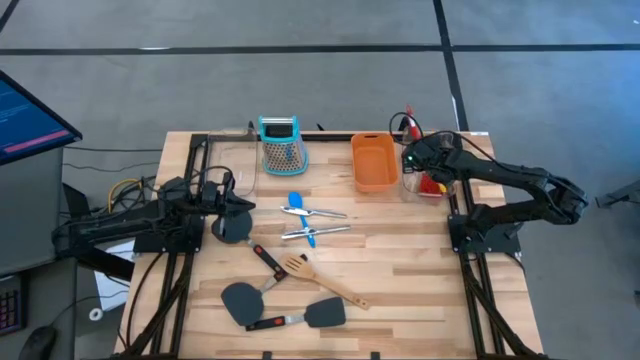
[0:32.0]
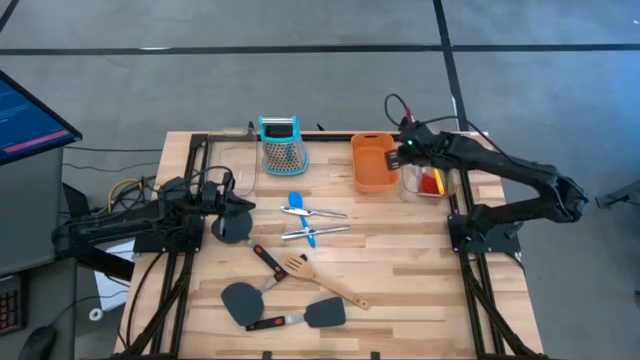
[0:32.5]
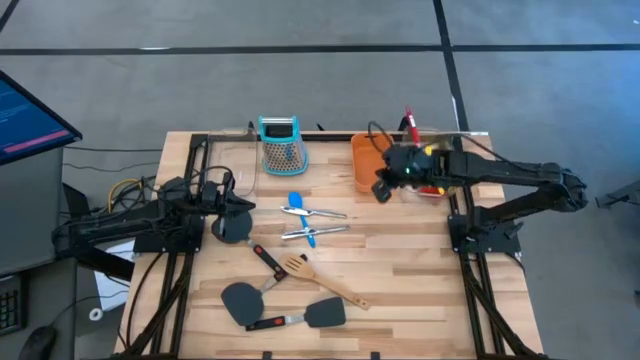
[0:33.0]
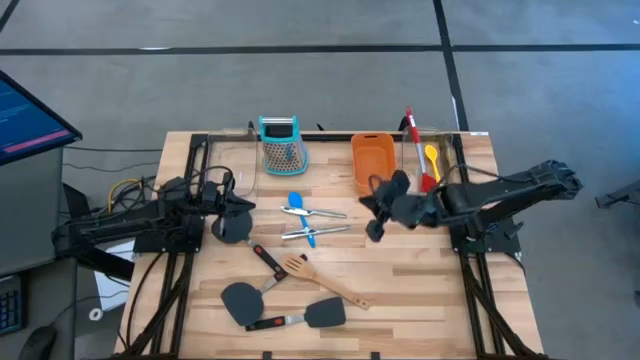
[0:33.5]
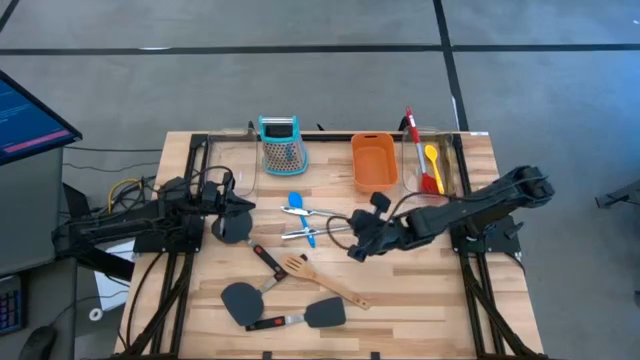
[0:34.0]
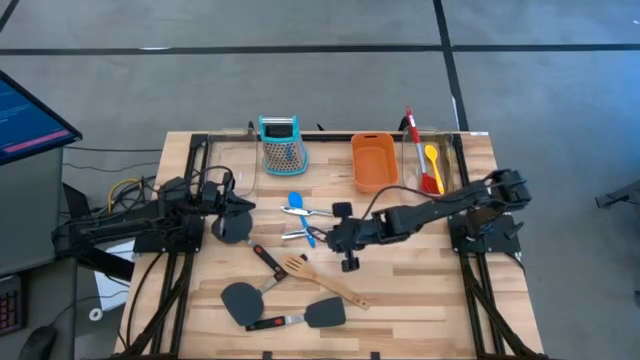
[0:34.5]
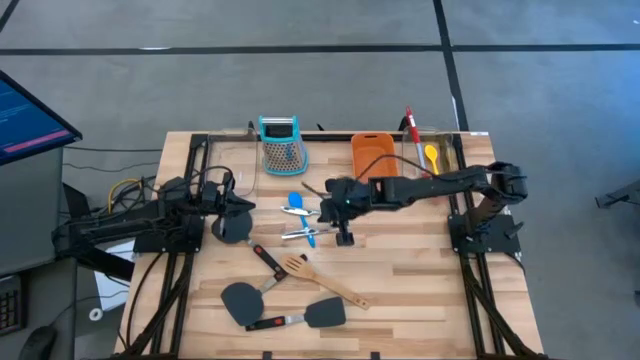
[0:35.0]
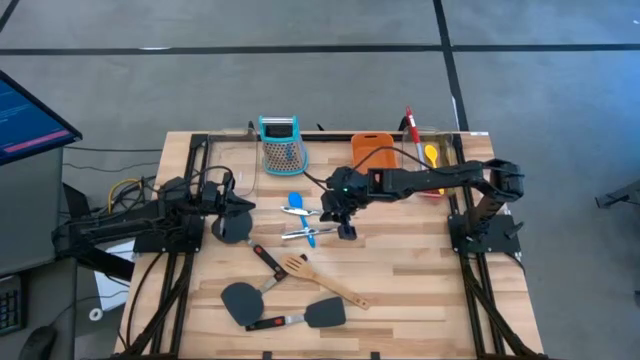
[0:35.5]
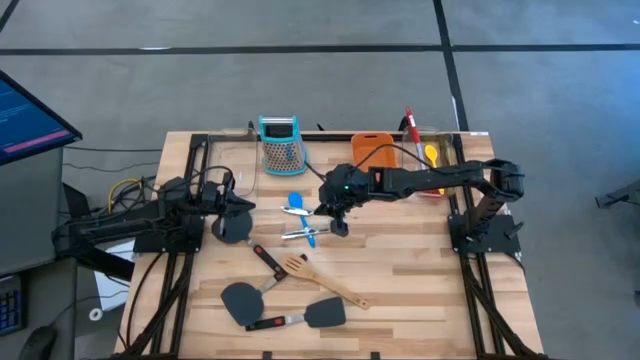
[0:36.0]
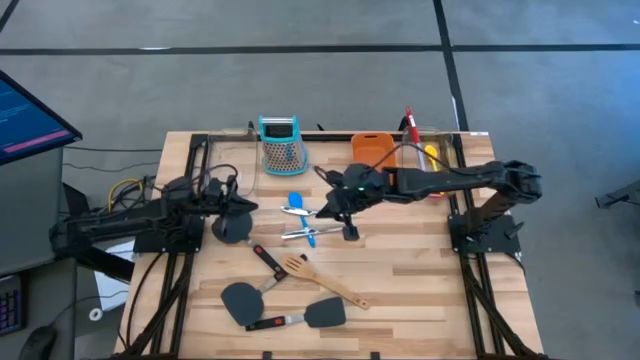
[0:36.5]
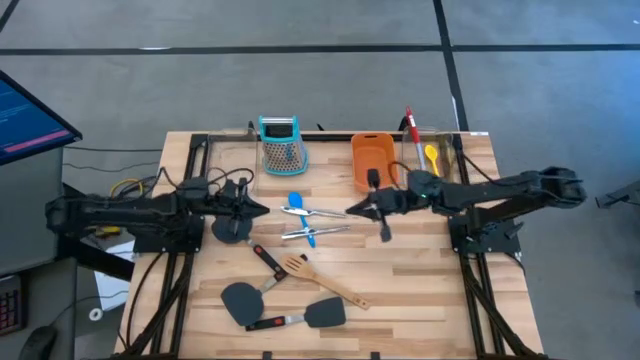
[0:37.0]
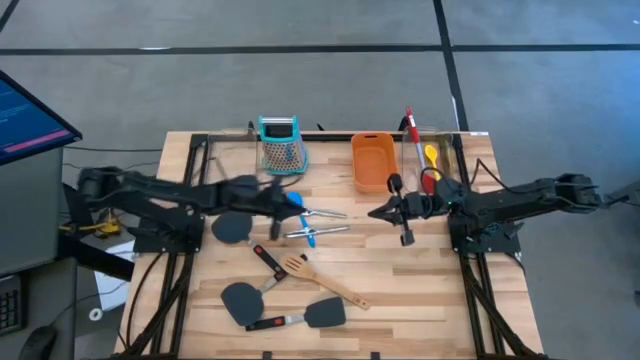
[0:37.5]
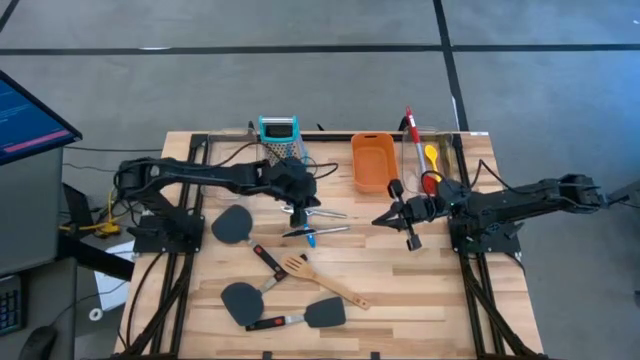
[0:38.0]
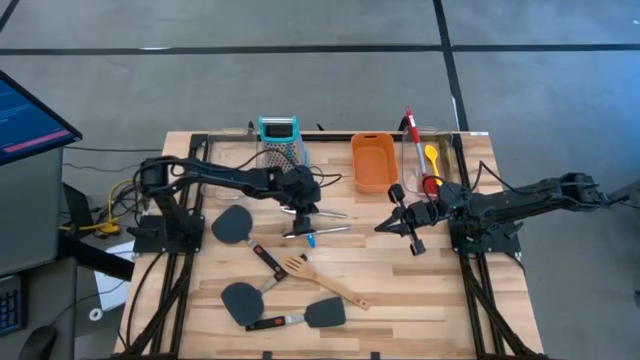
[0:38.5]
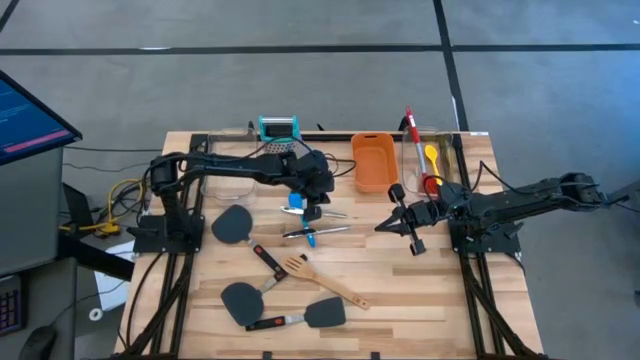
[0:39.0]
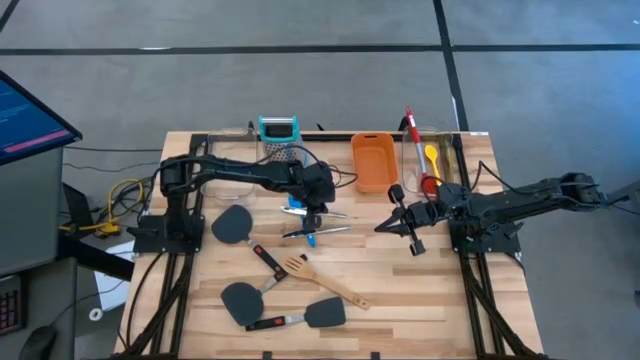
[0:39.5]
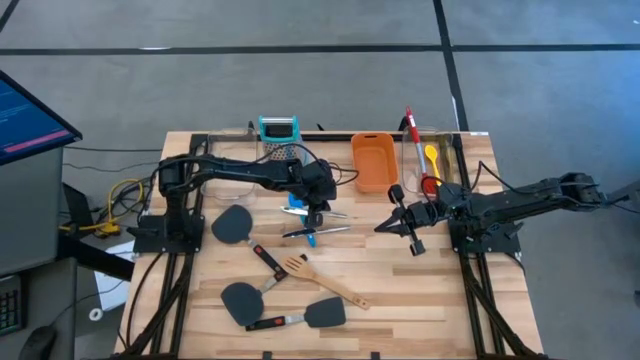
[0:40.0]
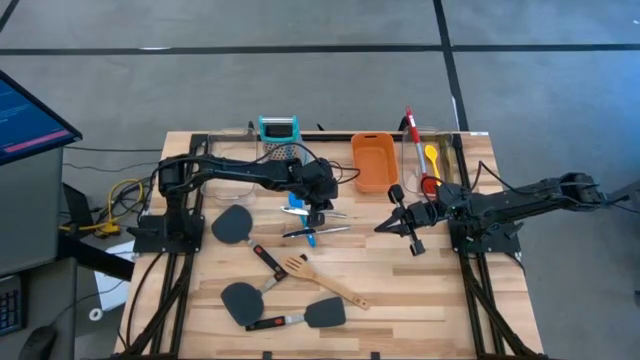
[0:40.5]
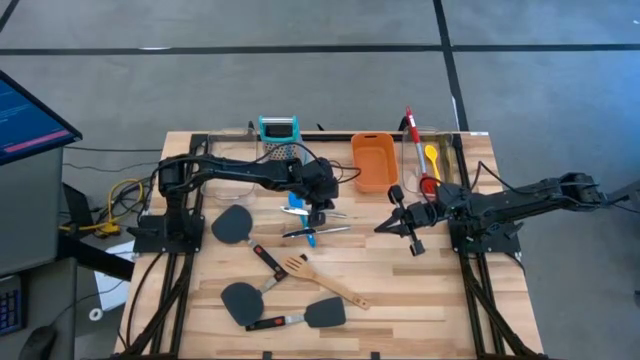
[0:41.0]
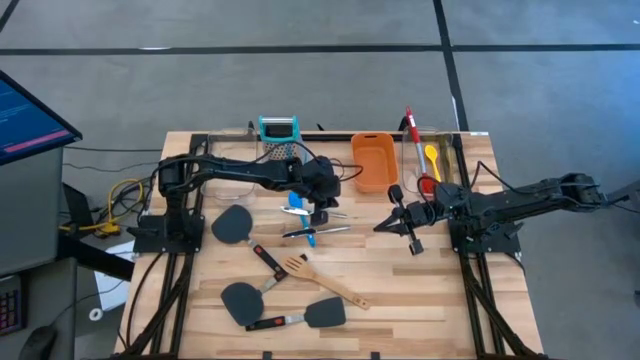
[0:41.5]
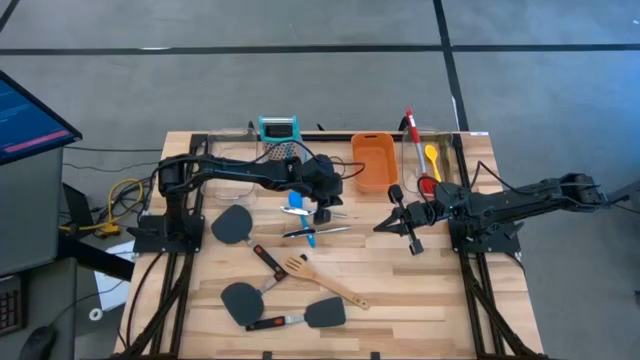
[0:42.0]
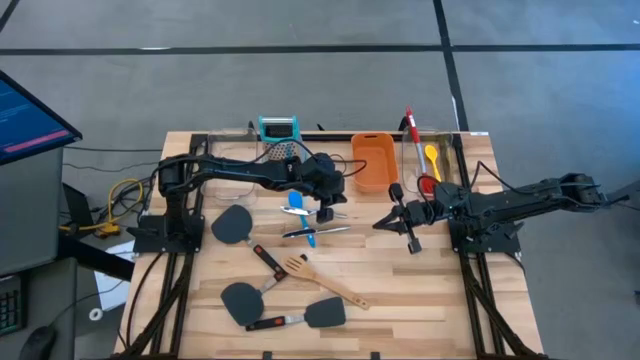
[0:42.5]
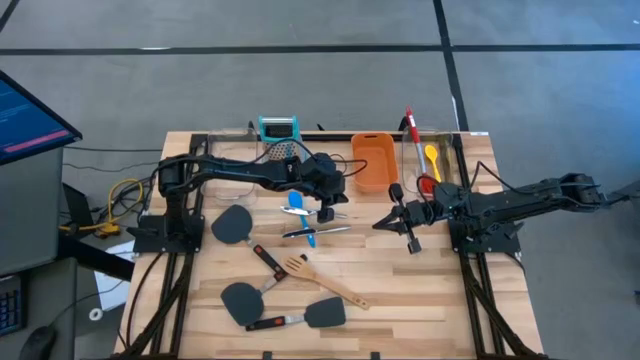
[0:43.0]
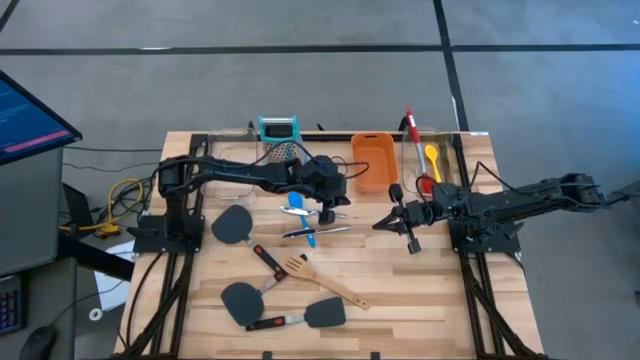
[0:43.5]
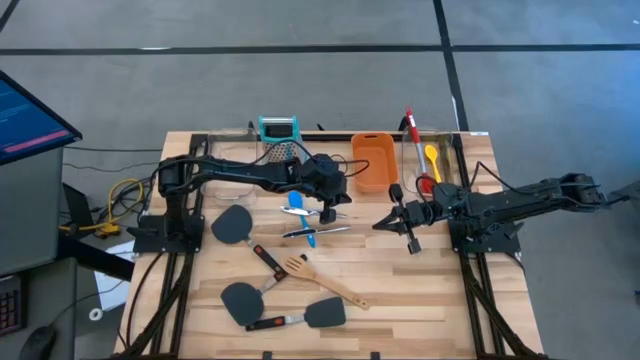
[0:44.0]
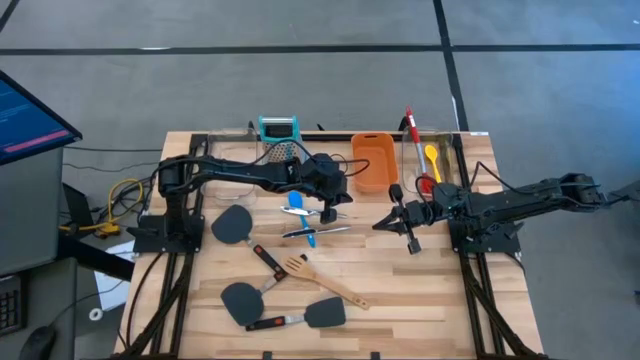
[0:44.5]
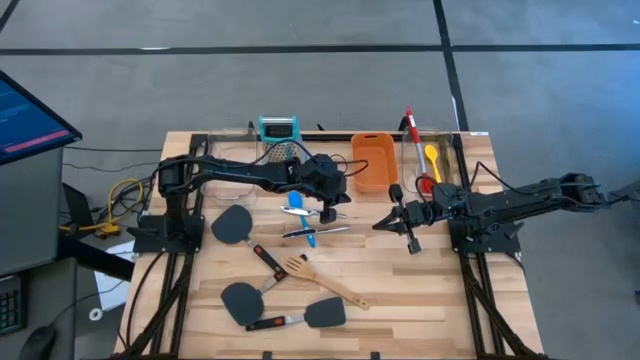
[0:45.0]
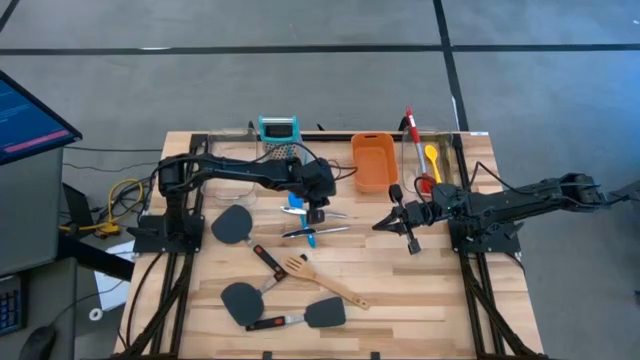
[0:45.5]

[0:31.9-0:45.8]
Task: Pick & Place Kitchen Items
Put the top silver kitchen knife into the orange bin

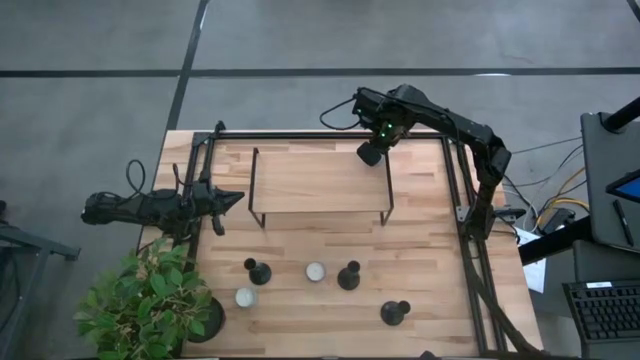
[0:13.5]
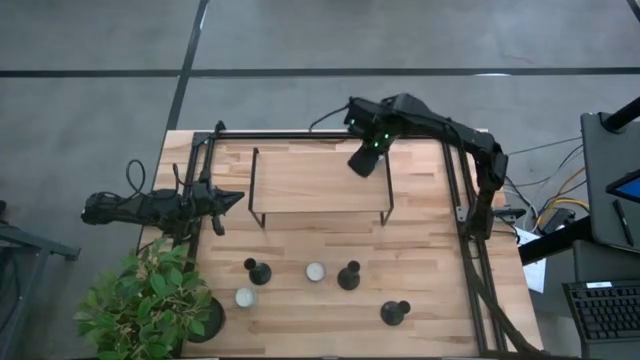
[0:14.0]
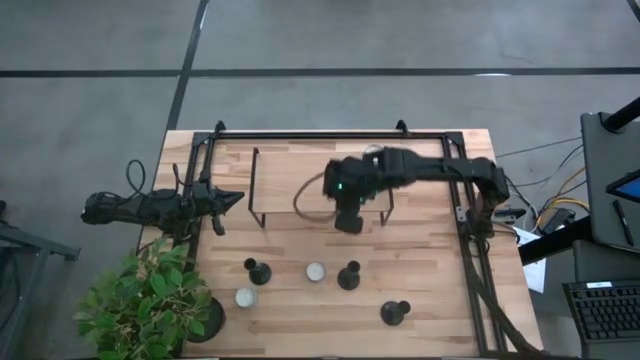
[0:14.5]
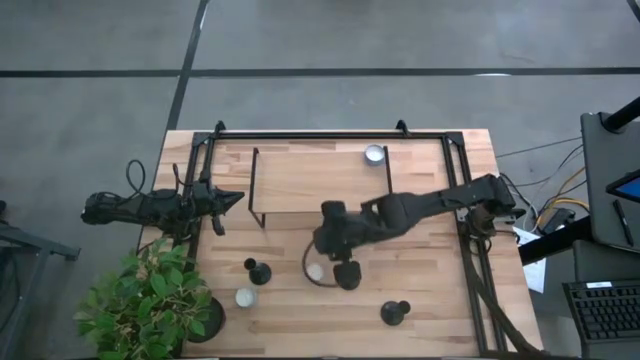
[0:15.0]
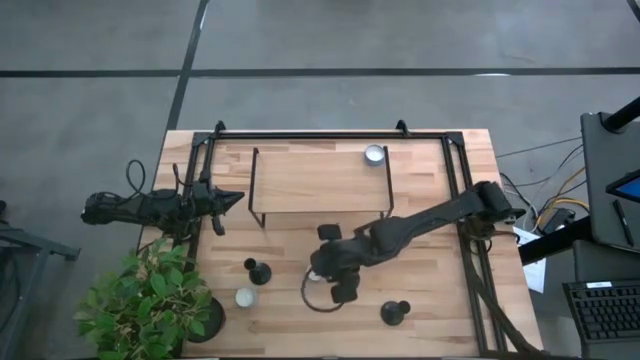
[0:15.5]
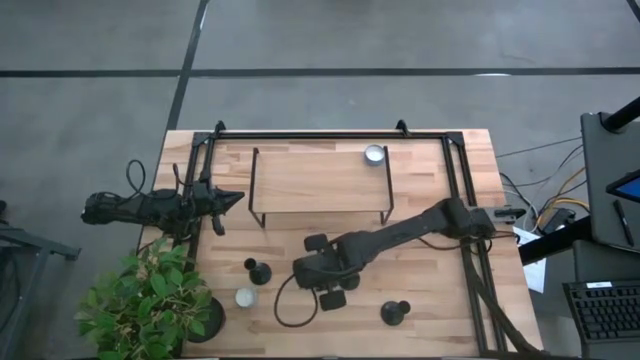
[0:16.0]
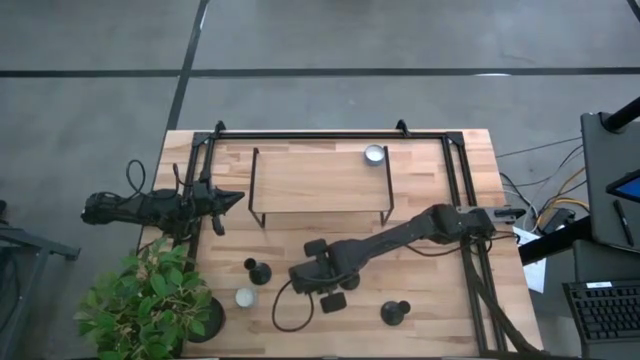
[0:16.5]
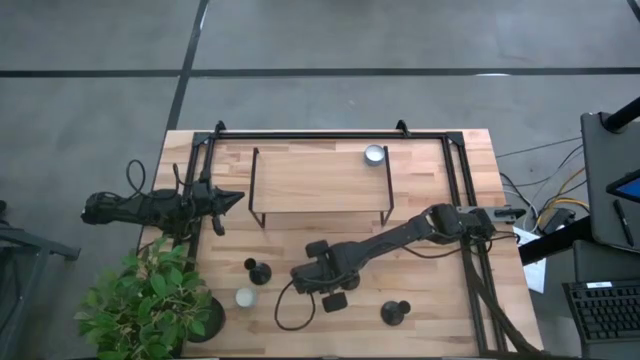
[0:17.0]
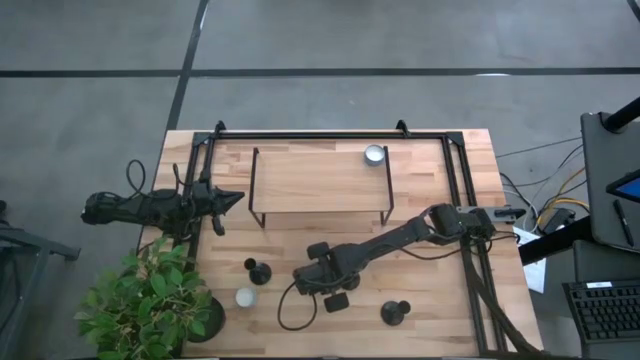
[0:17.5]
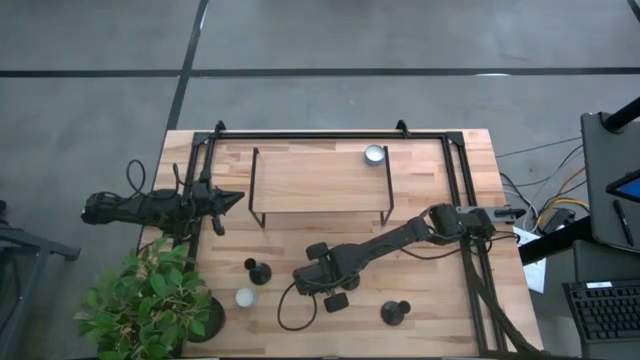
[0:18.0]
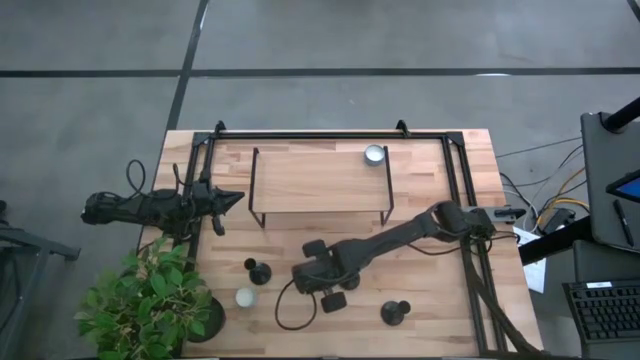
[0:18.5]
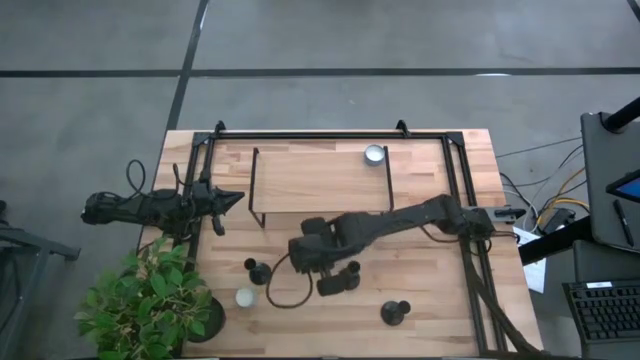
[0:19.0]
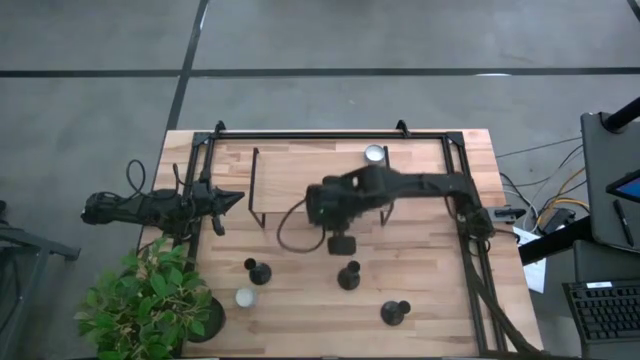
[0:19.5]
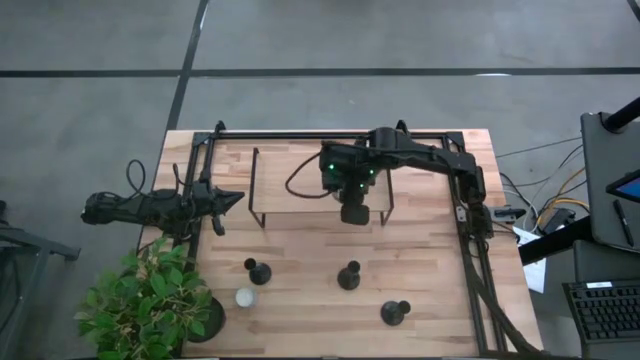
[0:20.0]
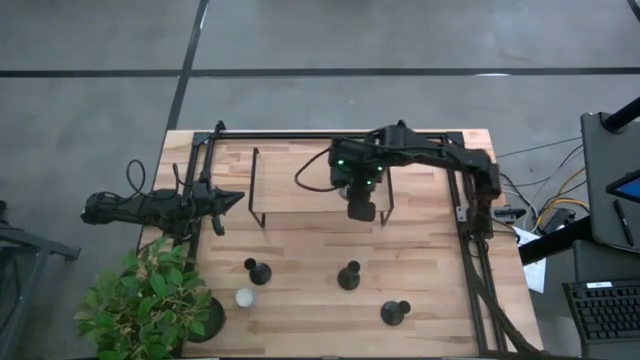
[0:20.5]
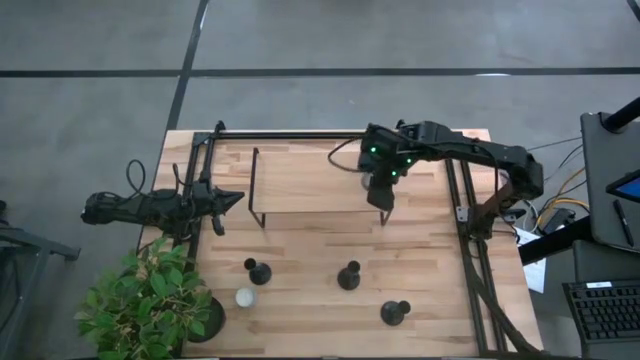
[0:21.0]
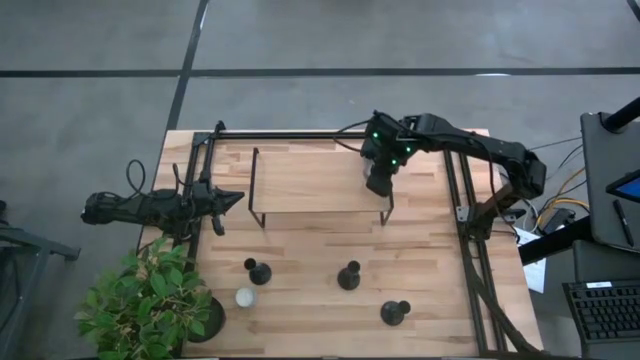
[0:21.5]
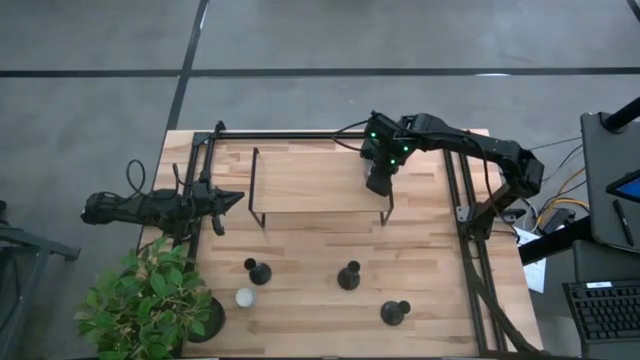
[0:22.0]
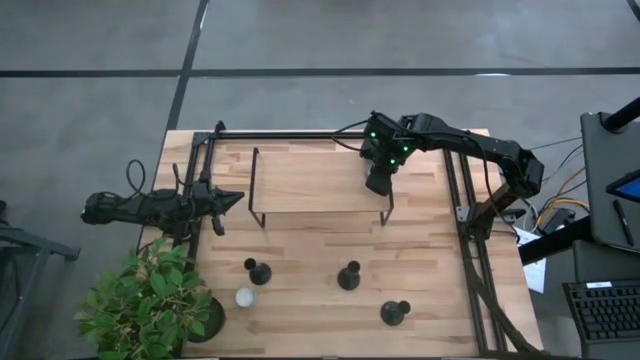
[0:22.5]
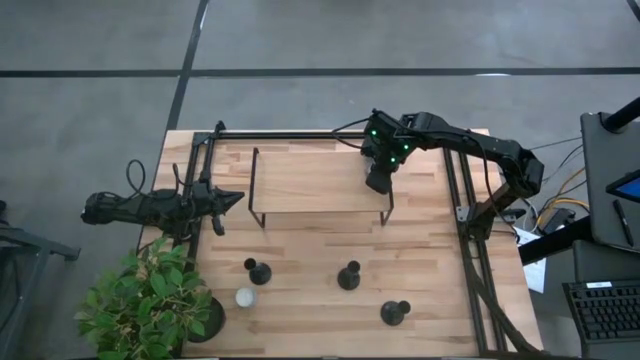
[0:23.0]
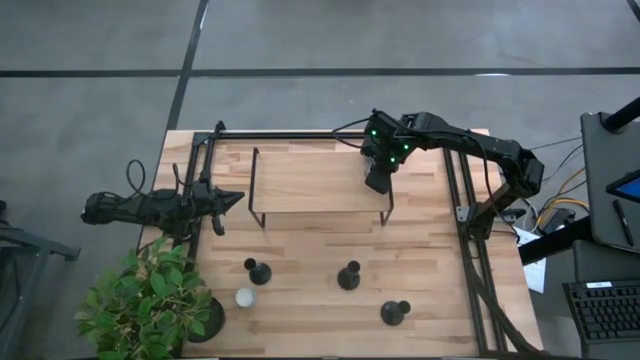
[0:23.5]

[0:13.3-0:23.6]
Task: Pick & Place candle stick holders
Put the red patterned candle on the shelf
